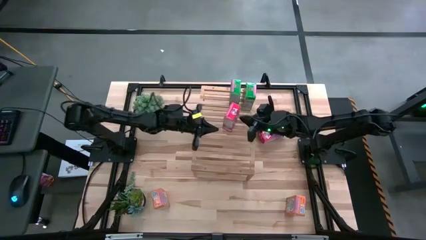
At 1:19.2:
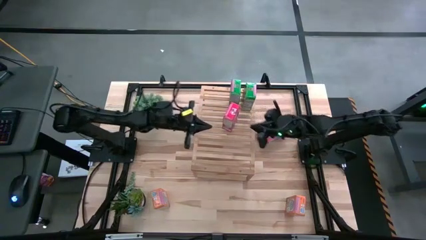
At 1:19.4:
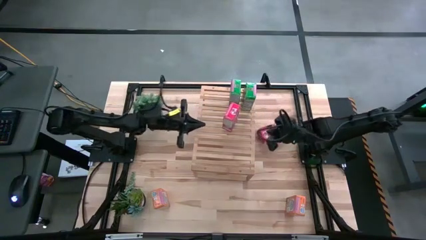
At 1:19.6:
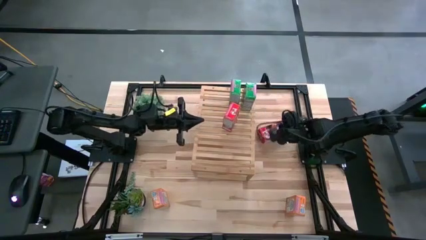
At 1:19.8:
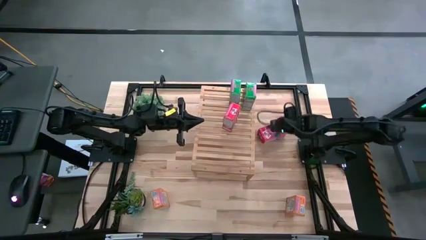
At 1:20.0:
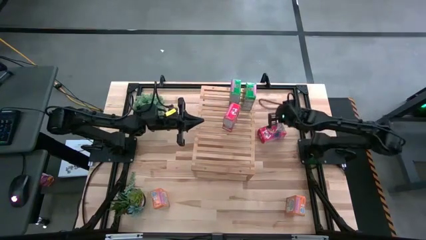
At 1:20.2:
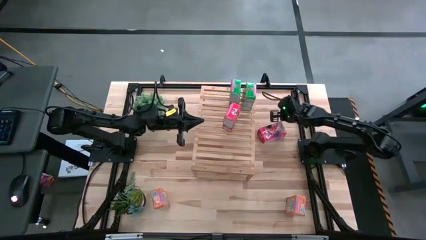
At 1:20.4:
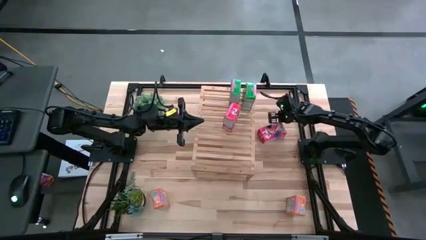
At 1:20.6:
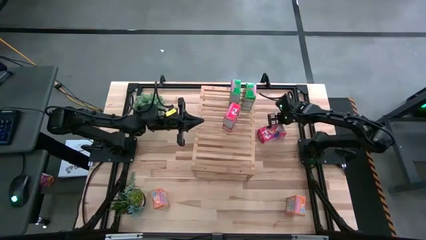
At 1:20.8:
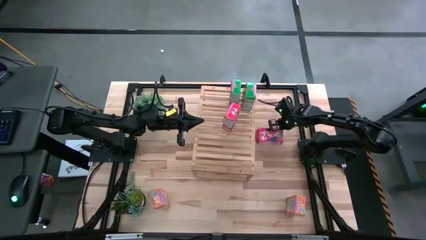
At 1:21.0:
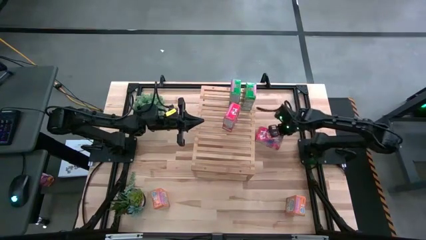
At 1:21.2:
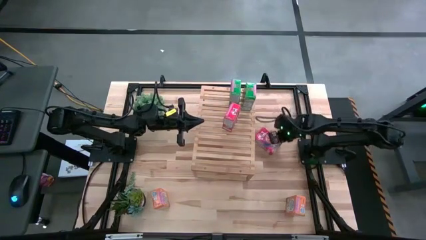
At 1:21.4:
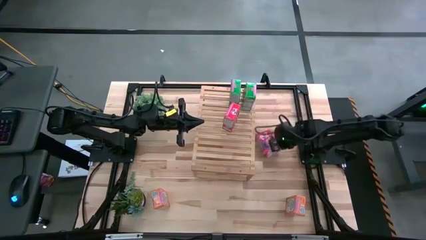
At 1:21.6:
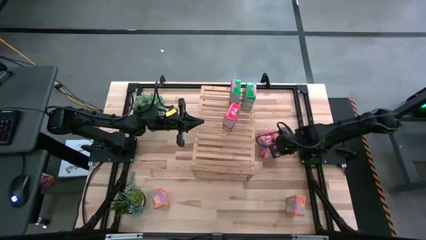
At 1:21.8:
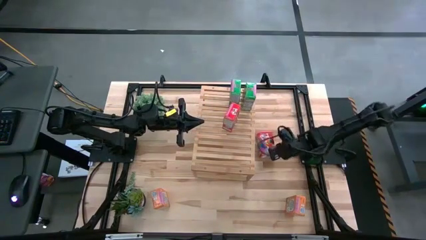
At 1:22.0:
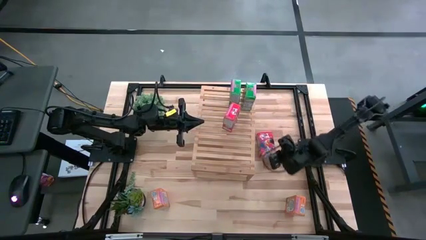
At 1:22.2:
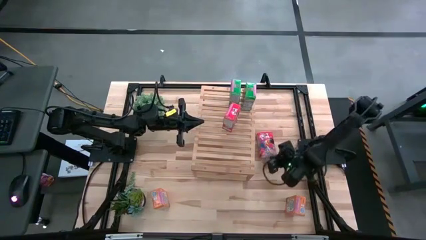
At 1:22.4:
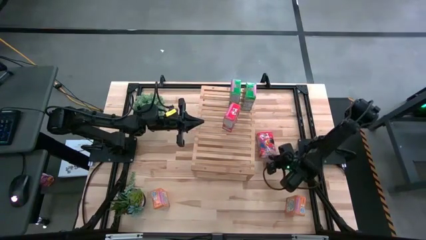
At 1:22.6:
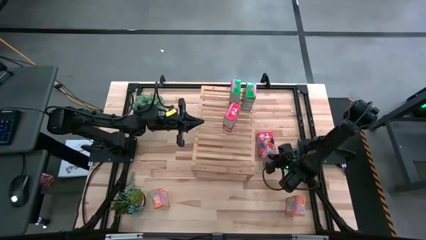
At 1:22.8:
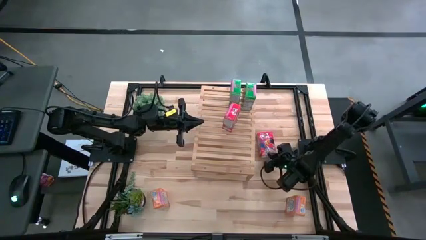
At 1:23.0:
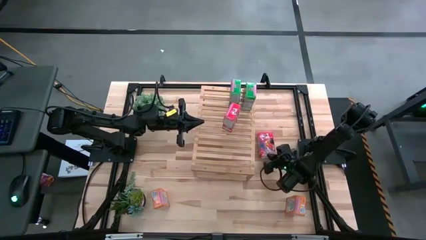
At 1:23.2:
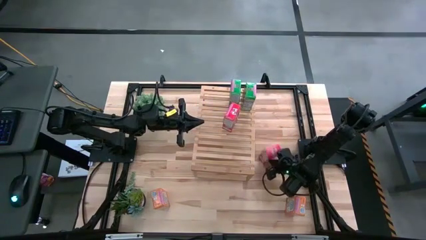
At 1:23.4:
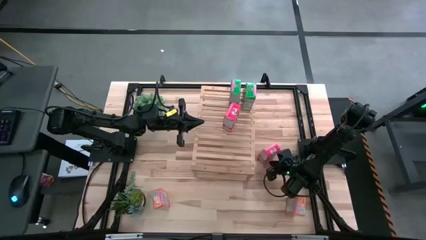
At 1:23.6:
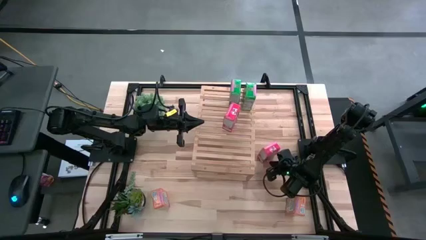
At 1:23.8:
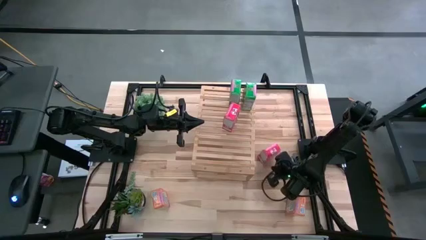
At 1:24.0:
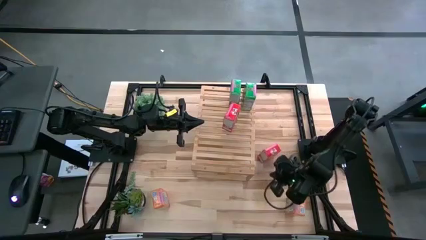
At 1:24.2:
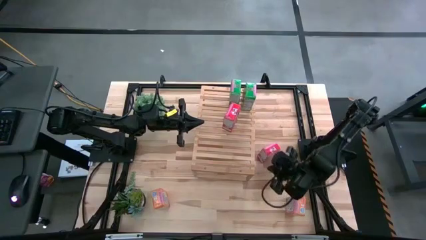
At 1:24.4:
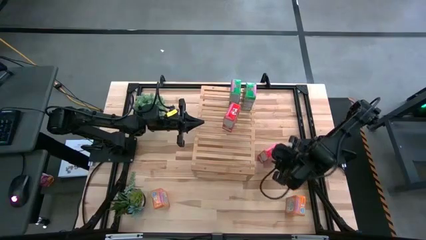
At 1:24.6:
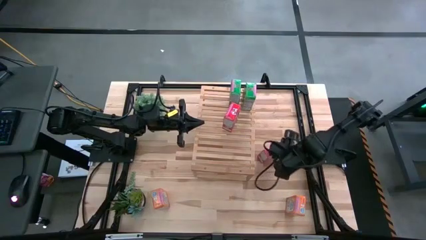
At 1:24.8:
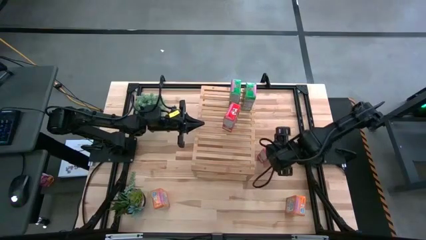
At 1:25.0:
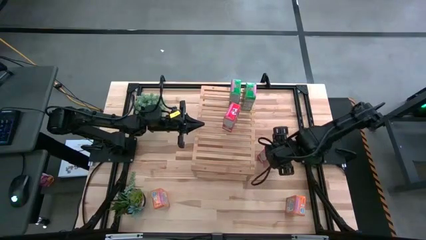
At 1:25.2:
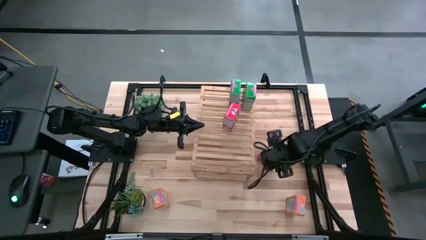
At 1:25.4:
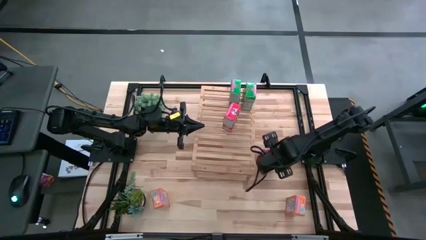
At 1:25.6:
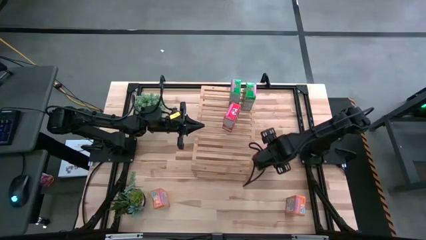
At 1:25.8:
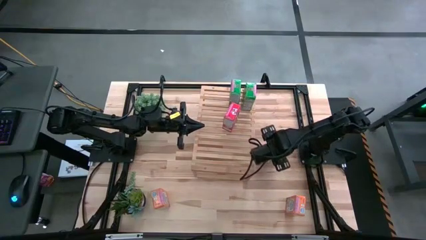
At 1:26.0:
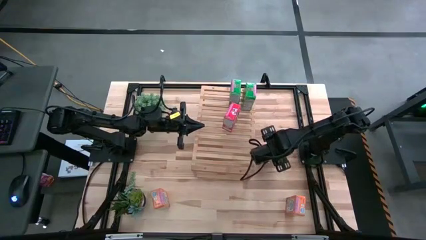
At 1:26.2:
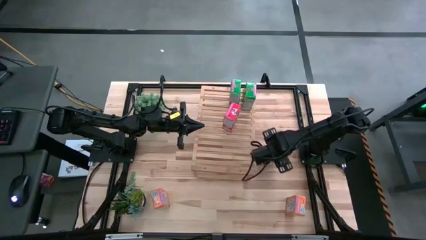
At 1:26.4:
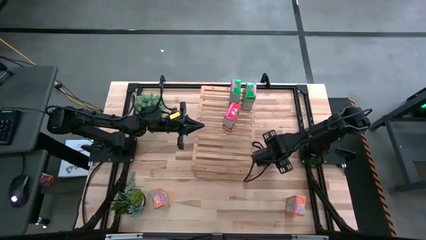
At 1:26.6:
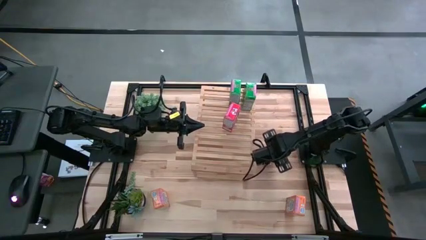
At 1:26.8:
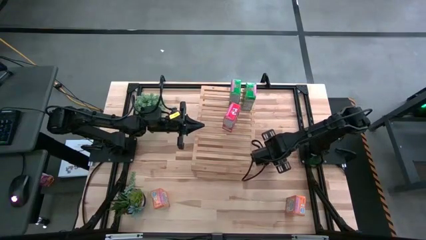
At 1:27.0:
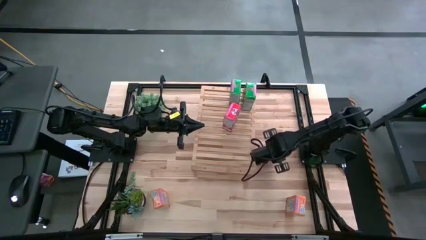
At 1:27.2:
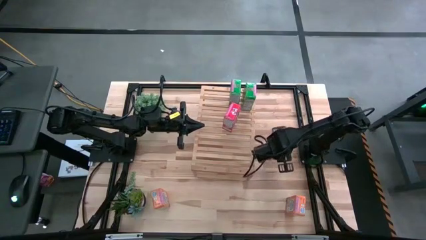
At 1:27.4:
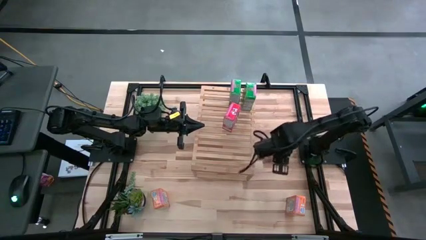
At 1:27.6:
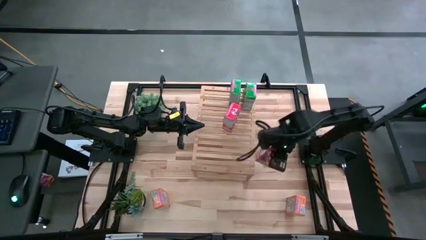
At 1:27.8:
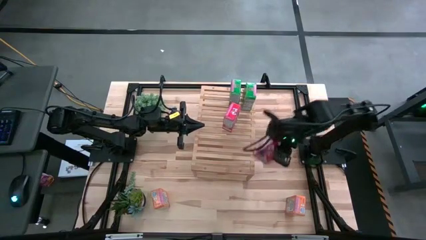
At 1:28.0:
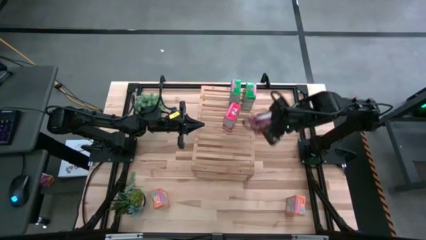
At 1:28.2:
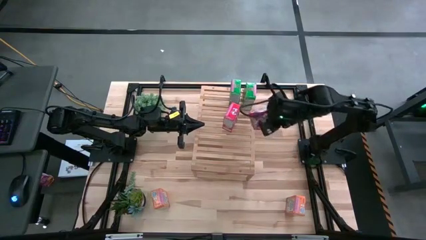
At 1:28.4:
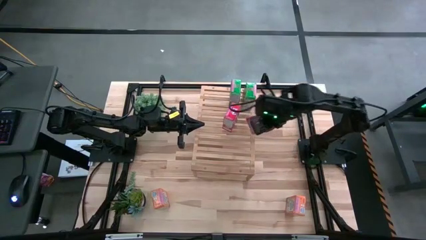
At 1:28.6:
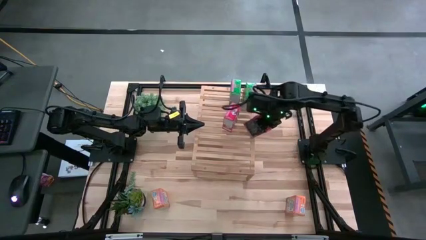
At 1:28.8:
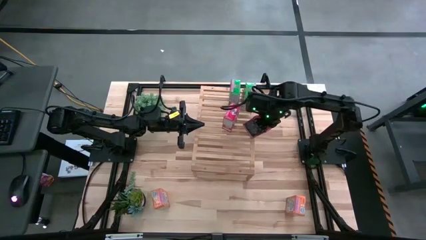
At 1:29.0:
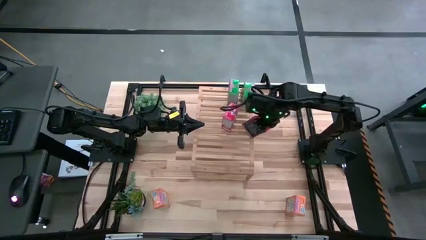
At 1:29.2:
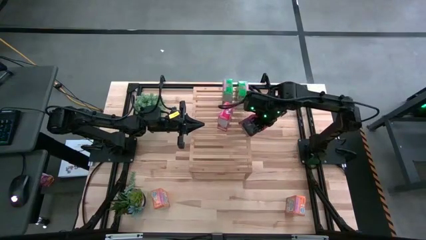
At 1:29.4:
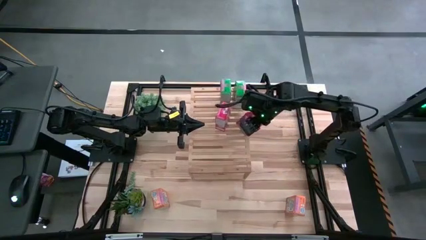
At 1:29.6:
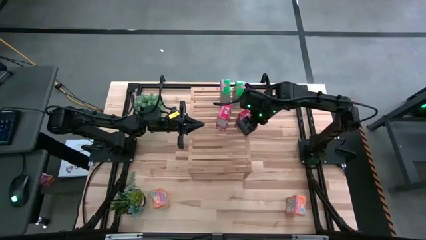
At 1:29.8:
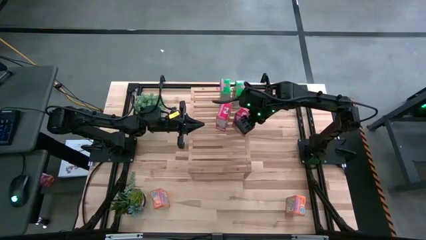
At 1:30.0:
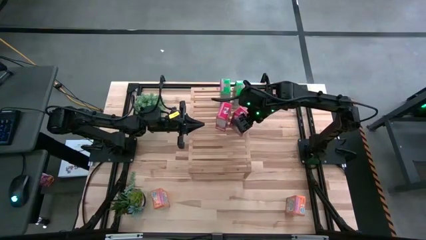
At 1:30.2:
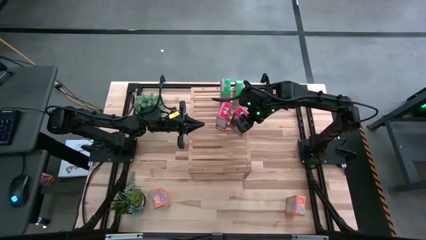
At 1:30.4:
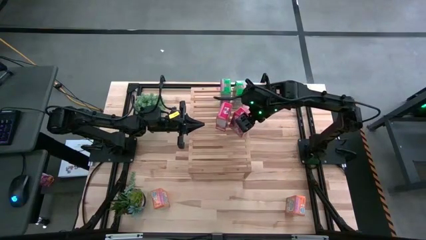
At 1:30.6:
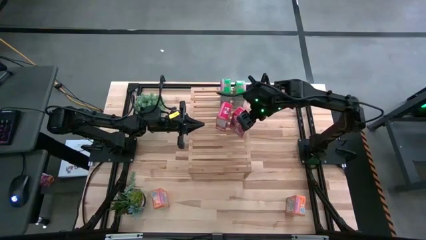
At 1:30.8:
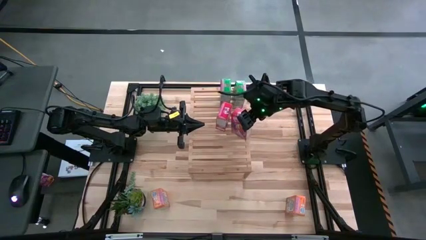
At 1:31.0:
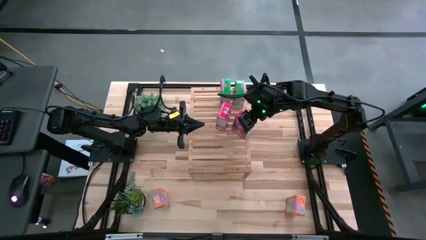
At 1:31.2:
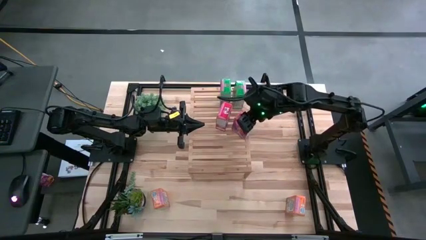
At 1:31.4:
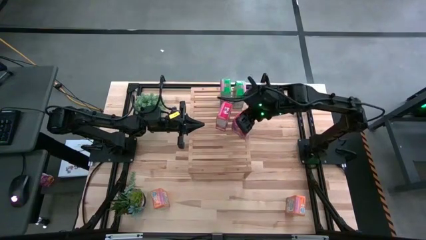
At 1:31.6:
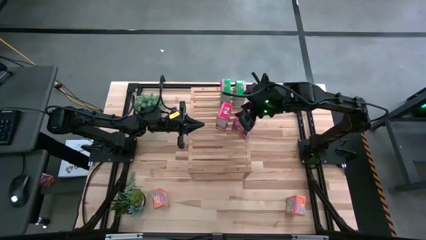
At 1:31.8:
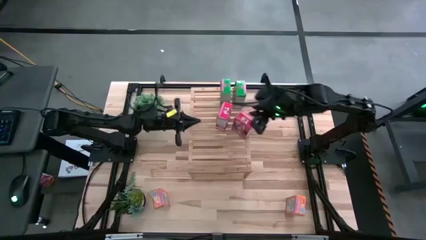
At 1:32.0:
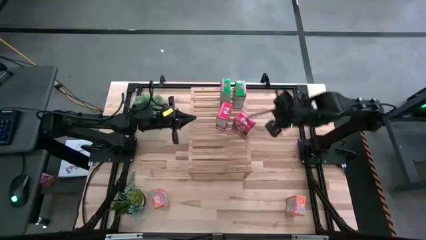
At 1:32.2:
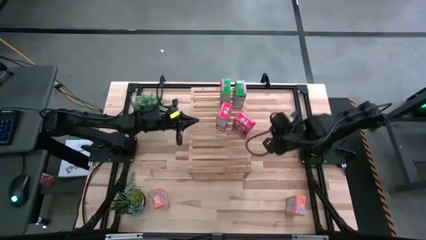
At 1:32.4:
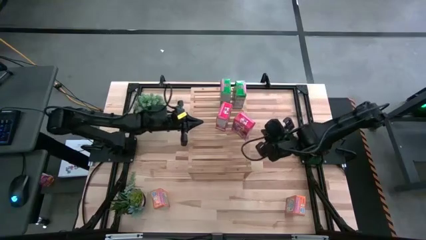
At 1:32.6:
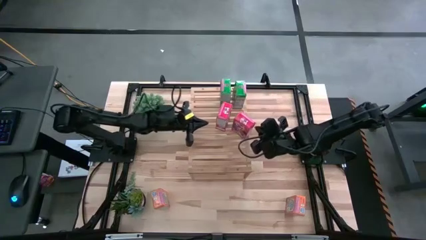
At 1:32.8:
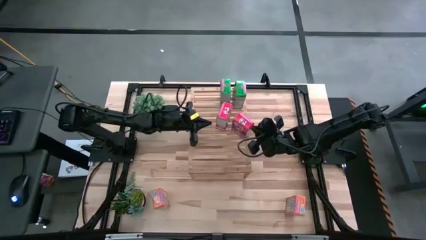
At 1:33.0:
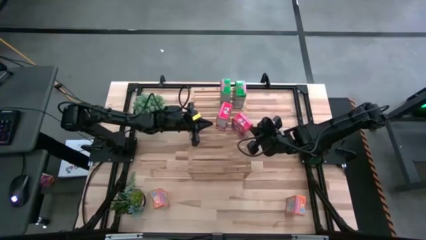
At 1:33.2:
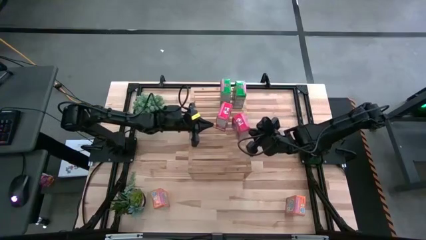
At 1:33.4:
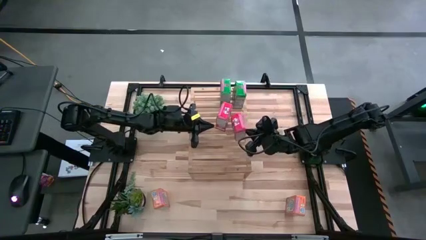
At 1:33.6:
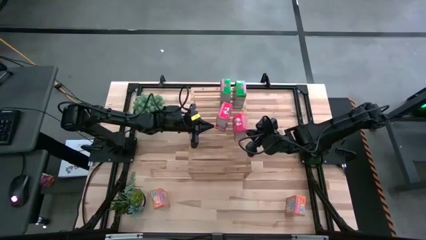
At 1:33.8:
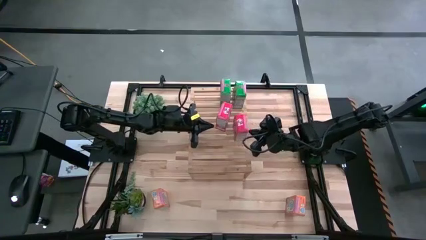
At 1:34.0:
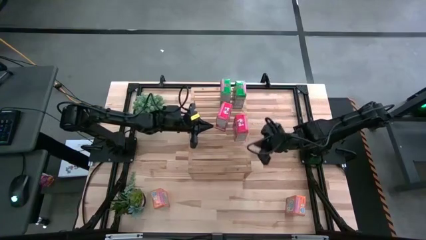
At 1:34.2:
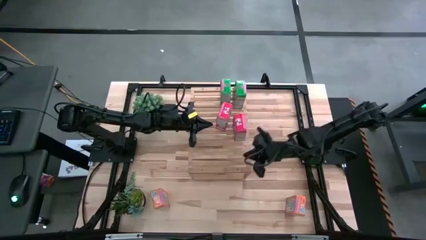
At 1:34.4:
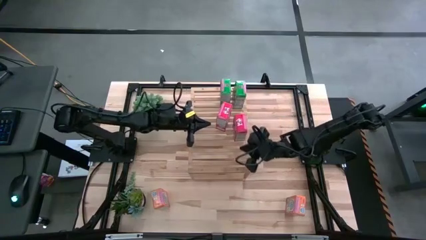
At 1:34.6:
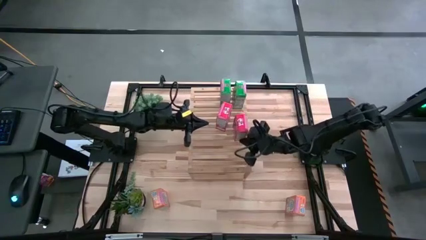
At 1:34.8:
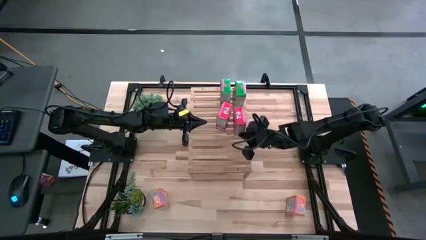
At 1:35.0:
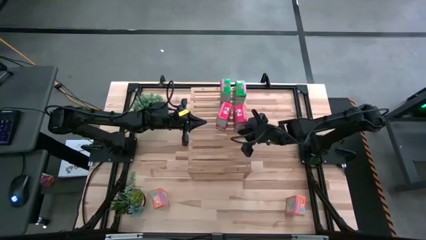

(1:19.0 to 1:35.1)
Task: Stack cereal on shelf
Put the red cereal box on the shelf aligned with the other red cereal box
